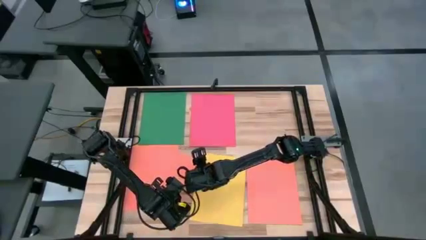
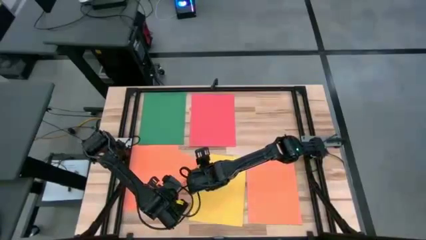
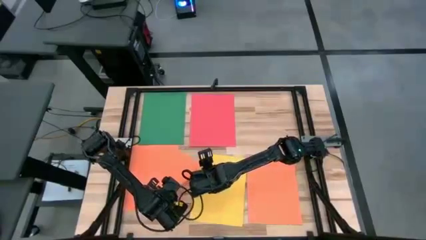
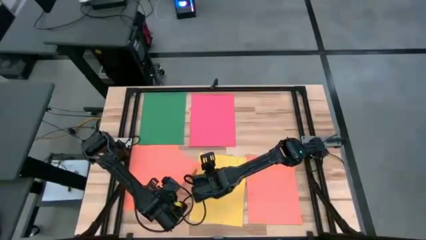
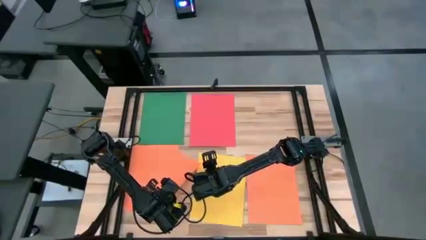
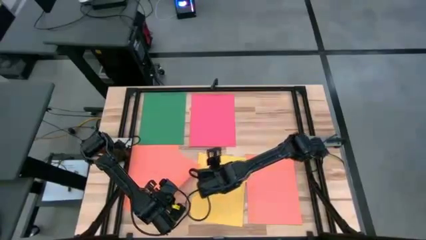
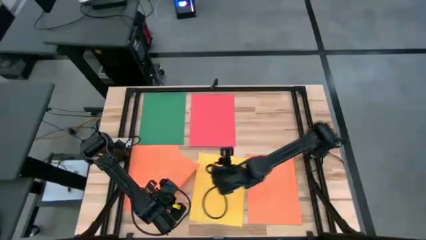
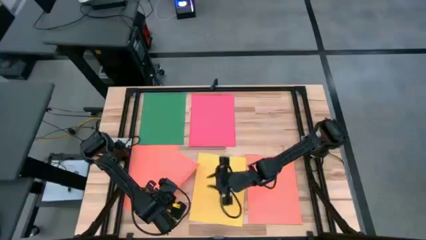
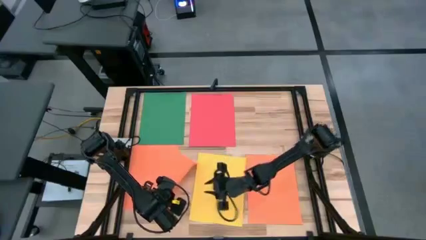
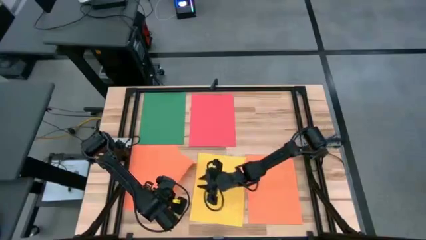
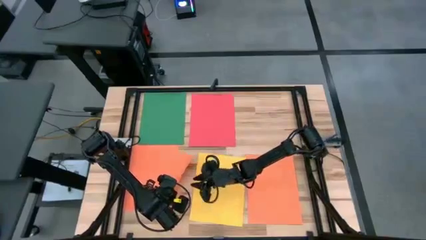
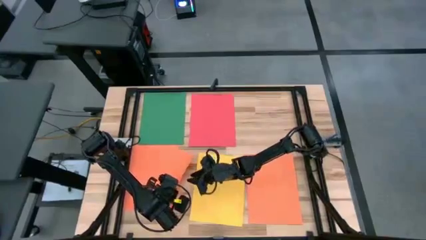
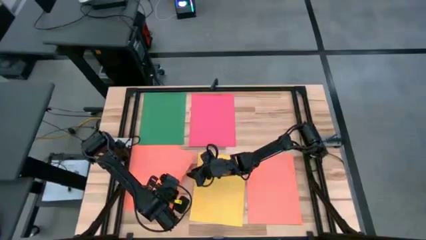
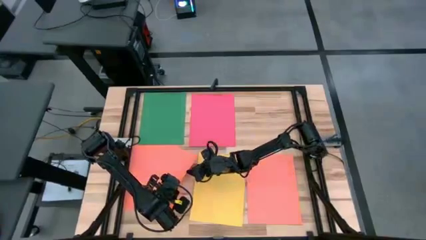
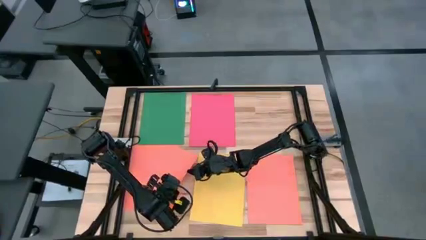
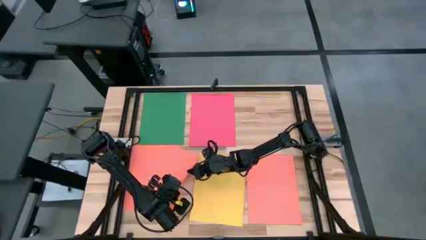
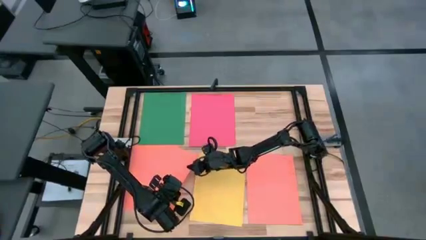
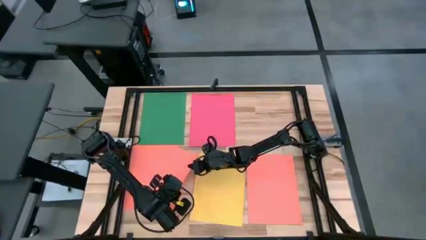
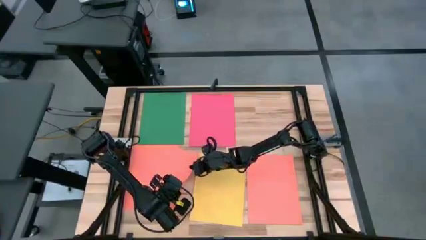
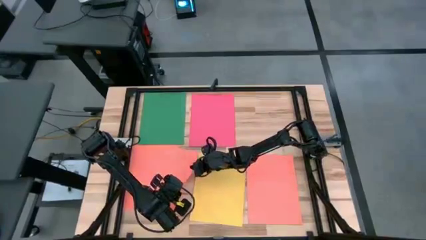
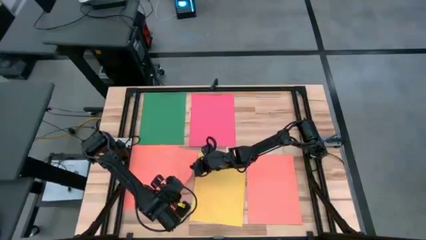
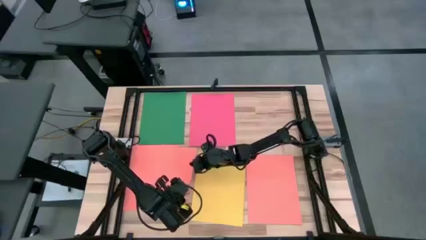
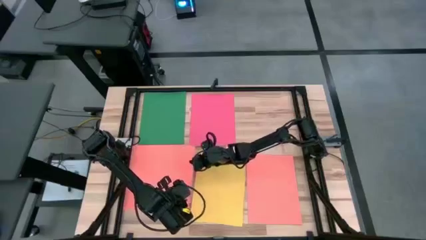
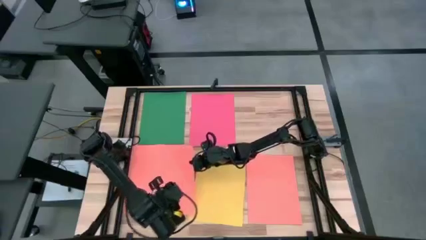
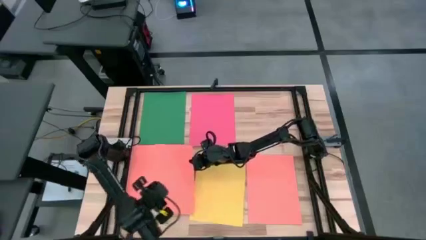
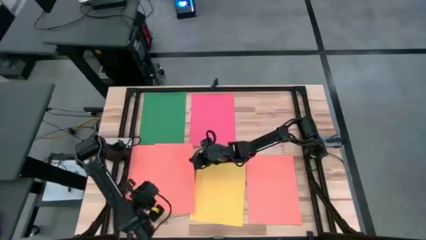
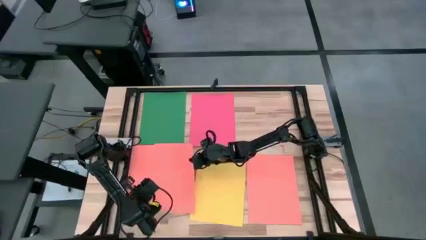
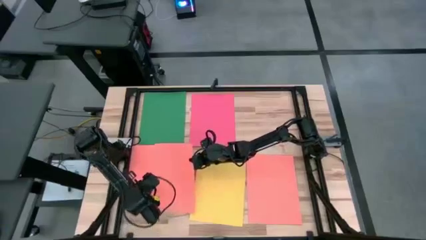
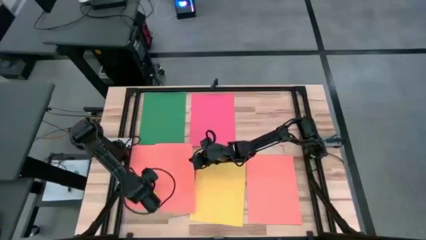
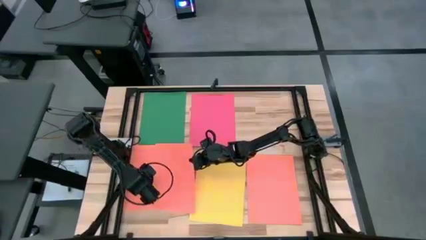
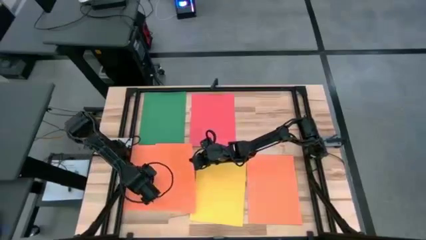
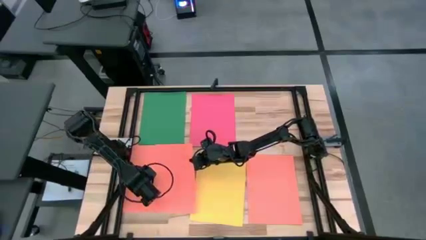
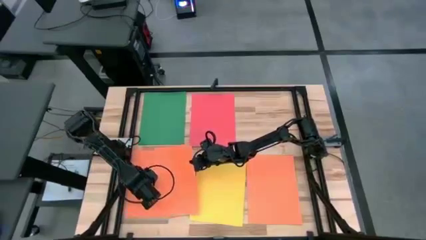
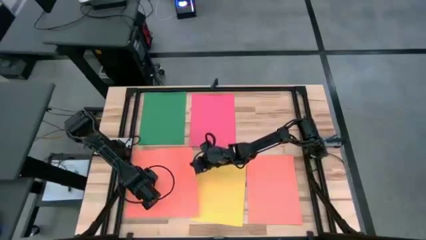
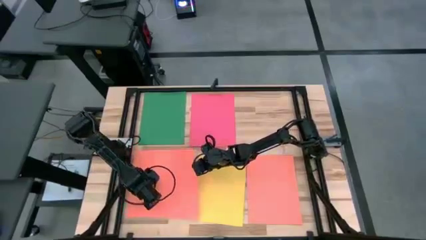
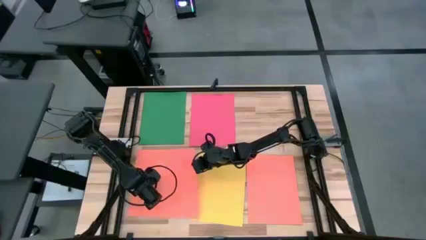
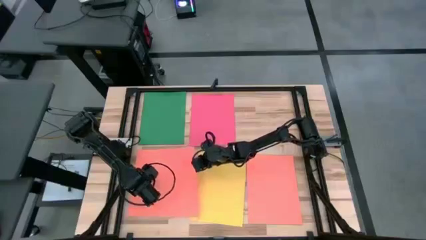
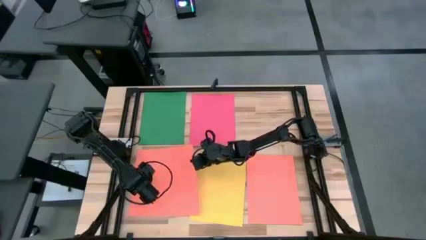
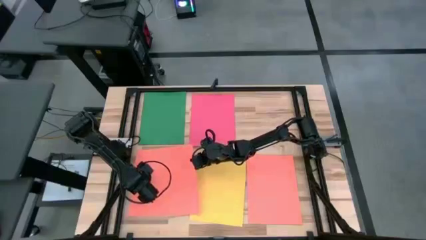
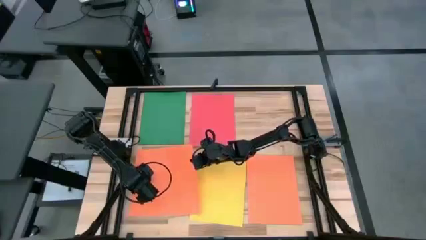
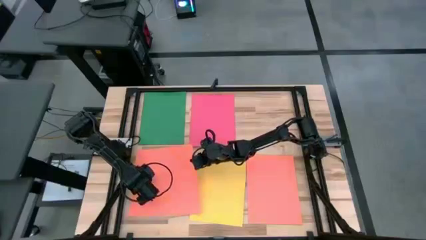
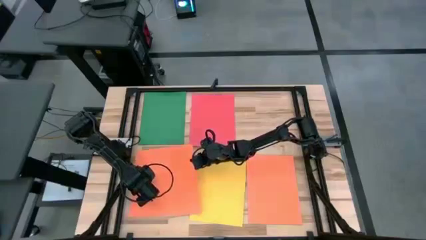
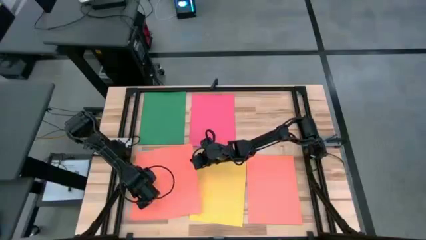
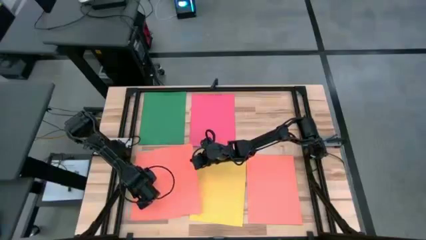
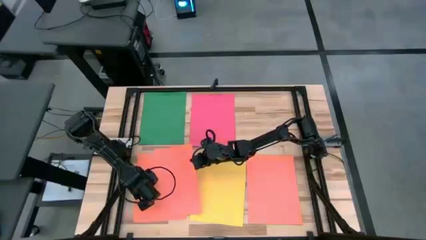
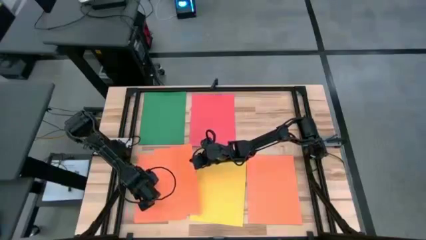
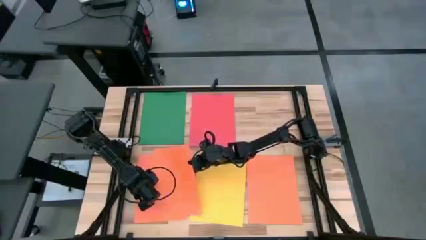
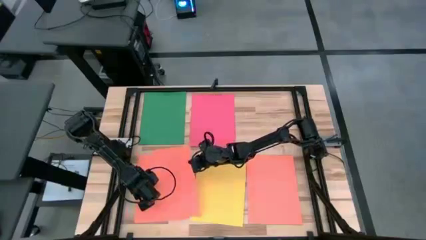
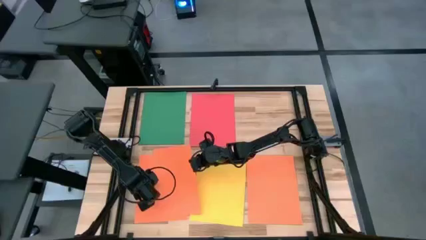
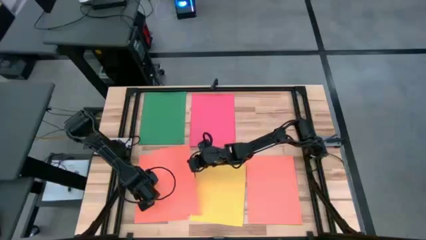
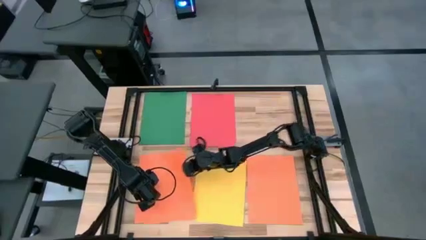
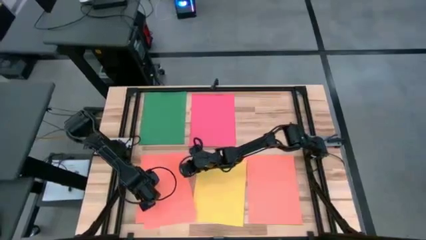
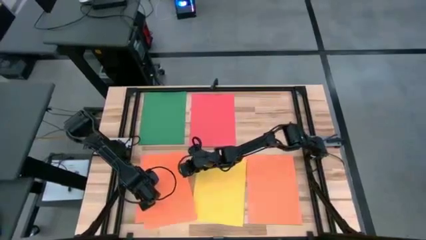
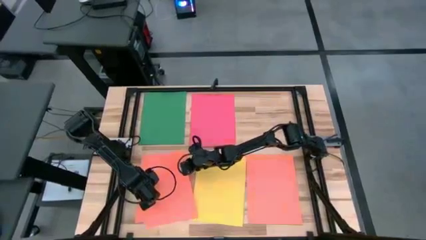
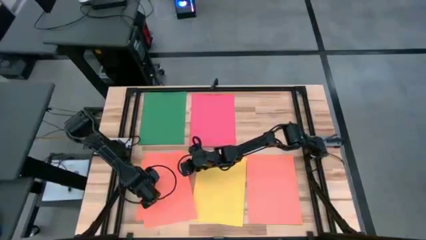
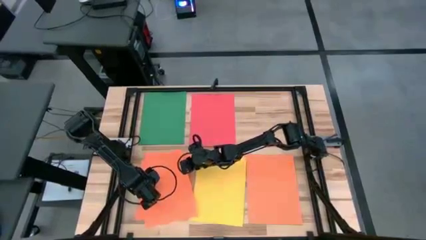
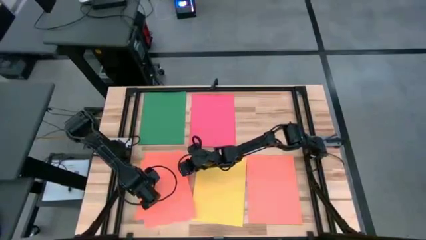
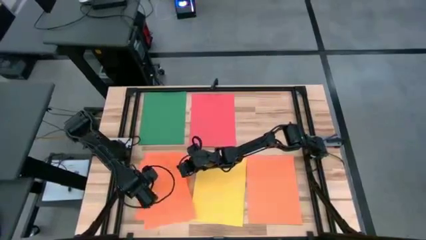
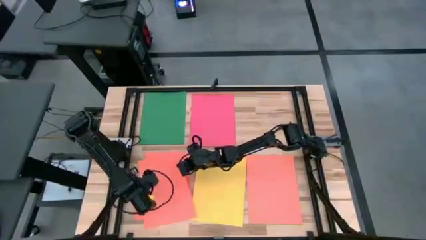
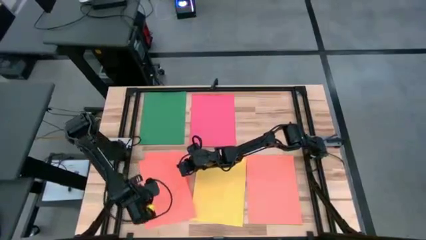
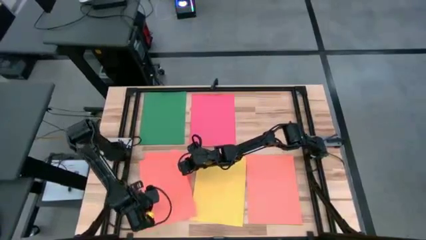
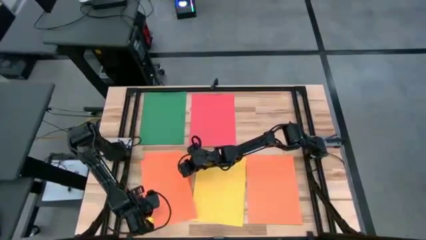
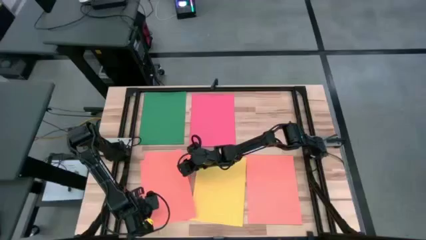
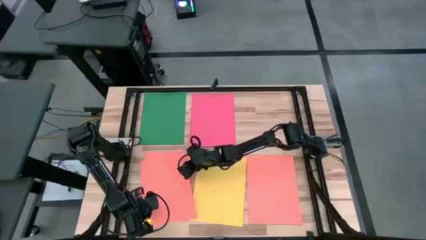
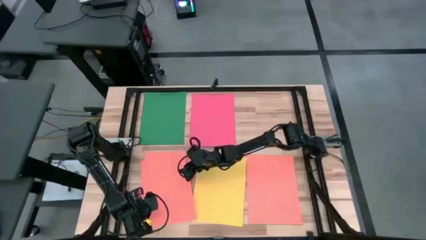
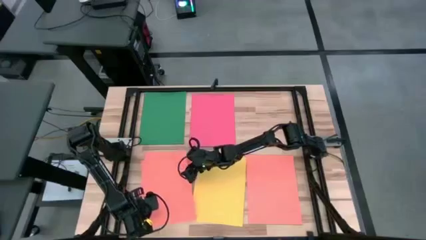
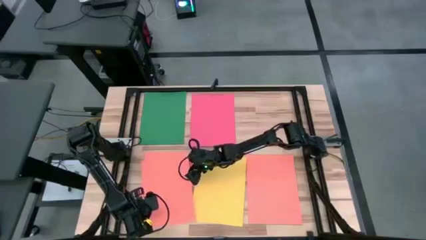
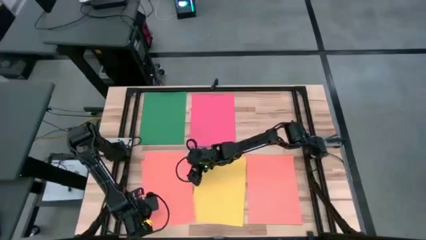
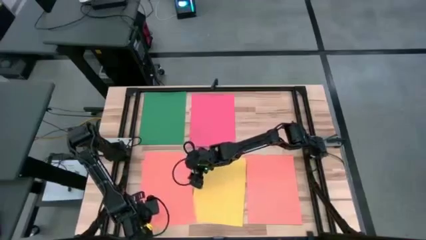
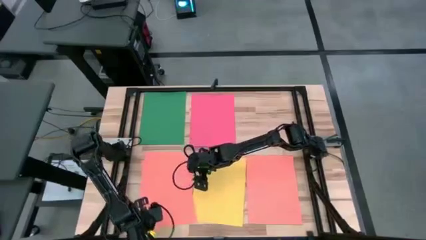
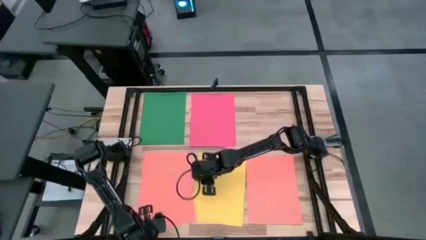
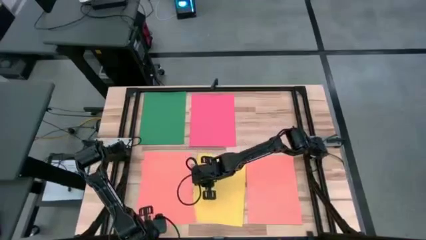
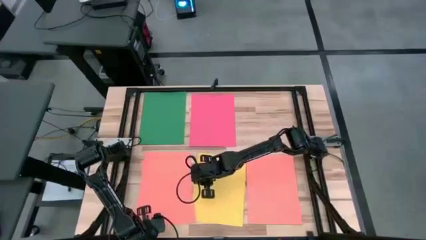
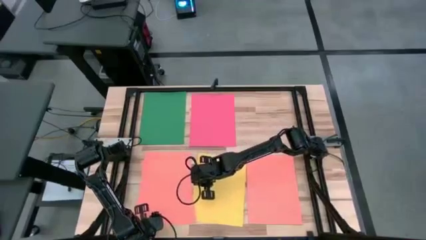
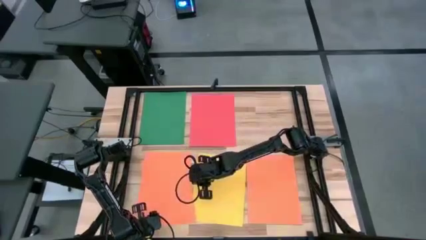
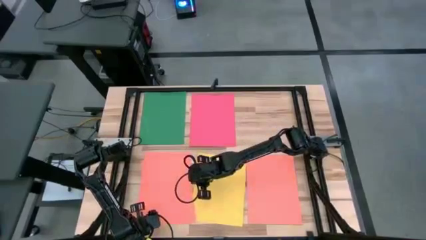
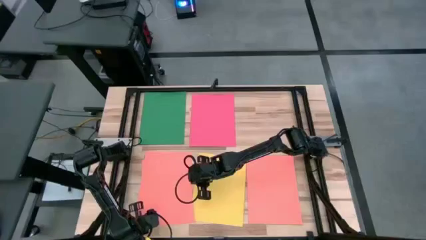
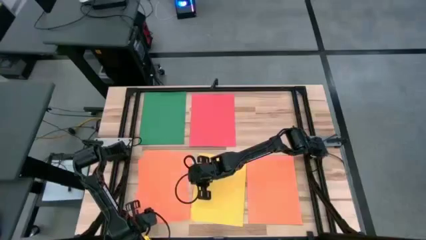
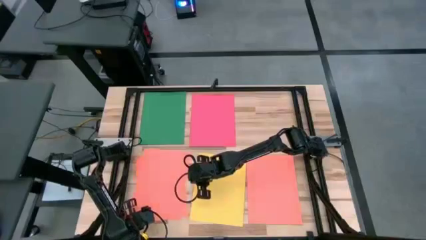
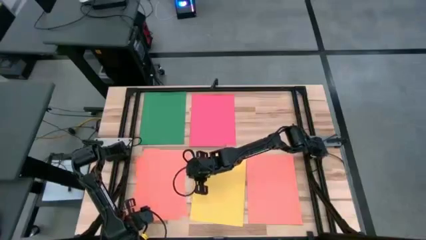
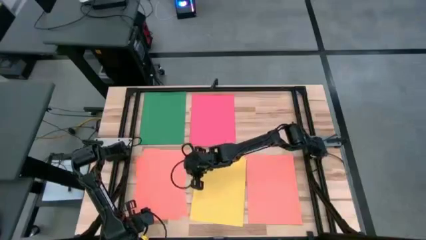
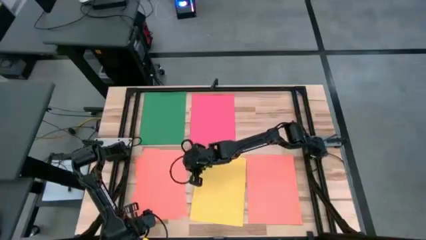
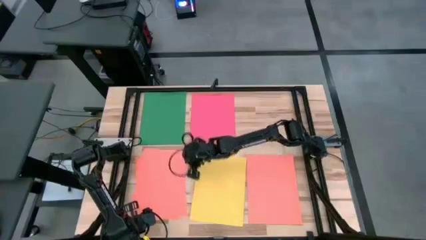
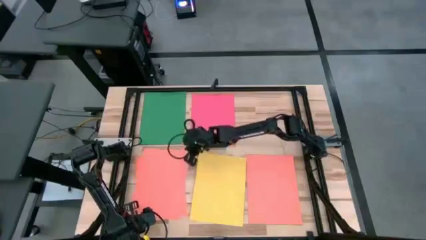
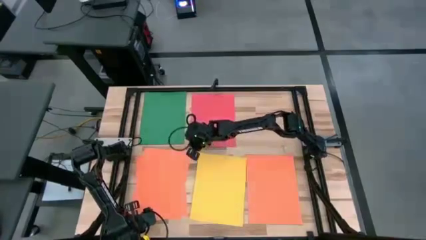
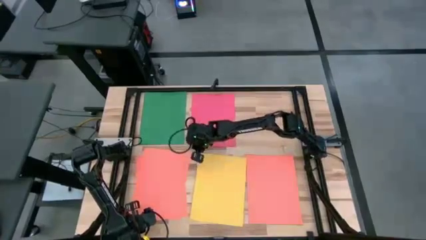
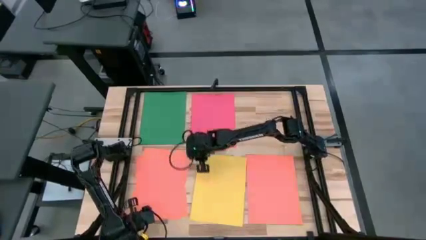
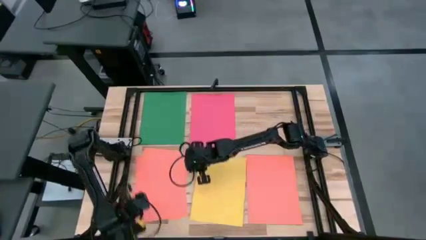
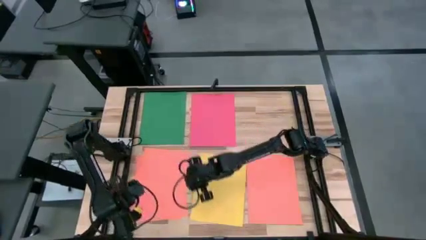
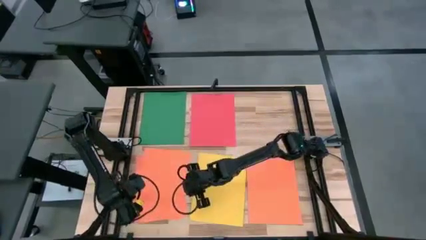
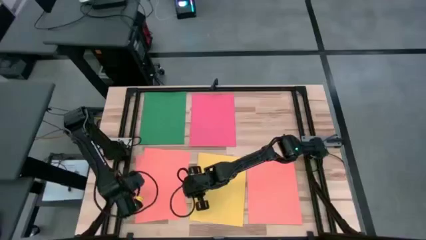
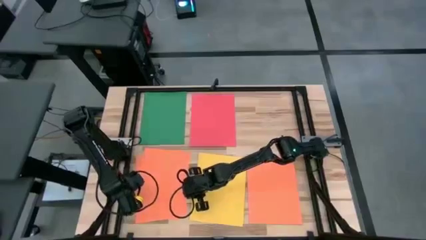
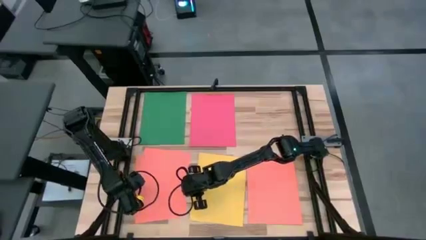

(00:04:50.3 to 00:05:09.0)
Task: Organize paper
Stack the orange paper on top of the orange paper
